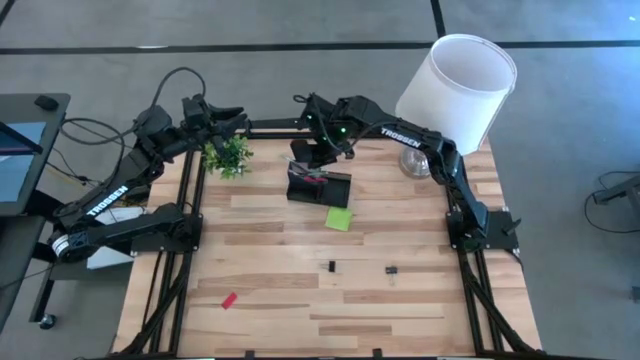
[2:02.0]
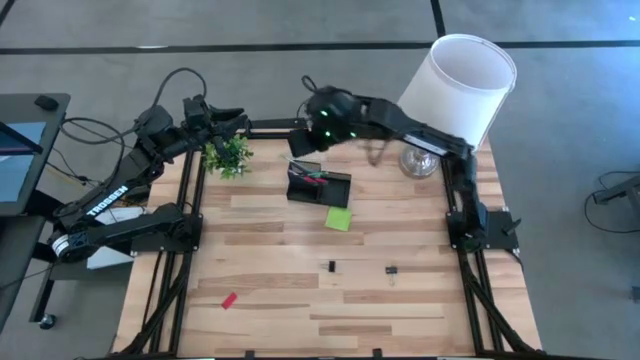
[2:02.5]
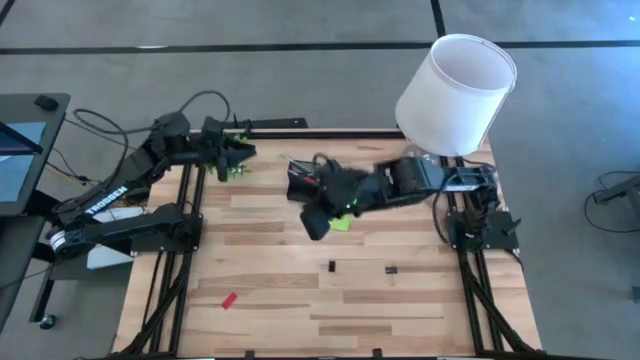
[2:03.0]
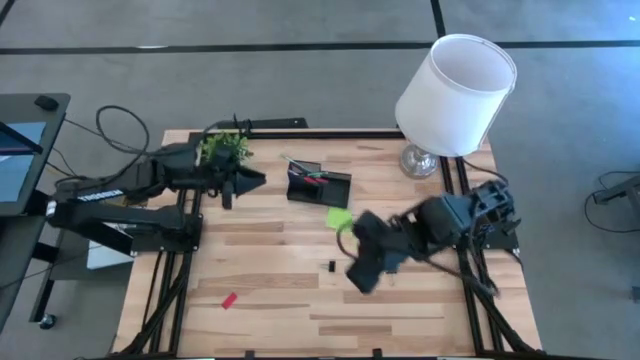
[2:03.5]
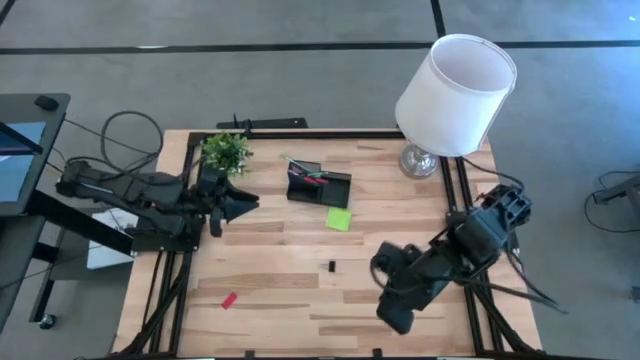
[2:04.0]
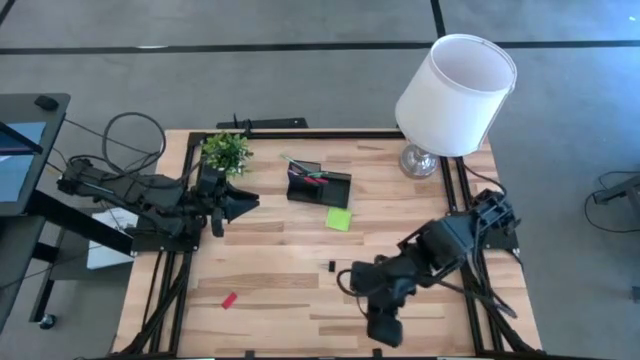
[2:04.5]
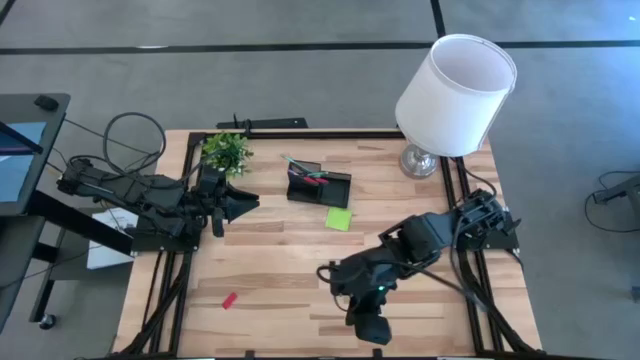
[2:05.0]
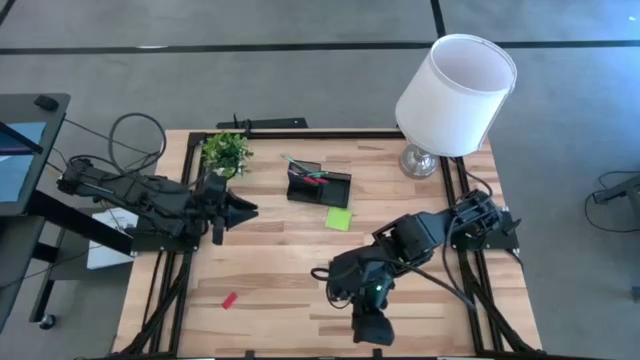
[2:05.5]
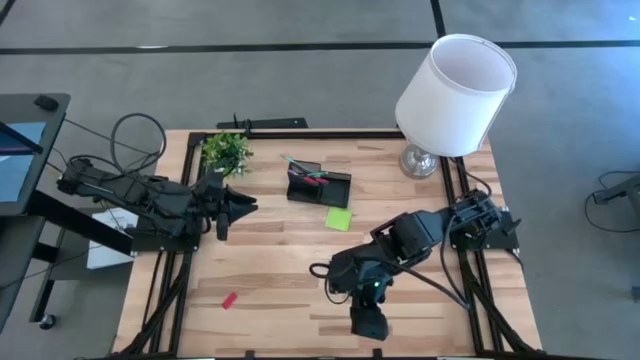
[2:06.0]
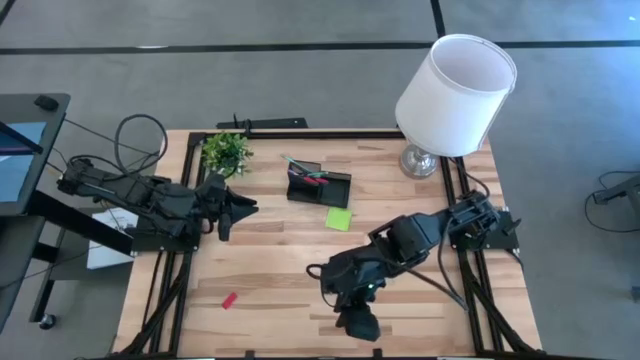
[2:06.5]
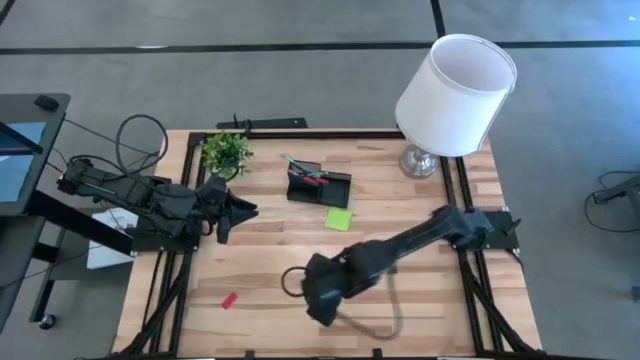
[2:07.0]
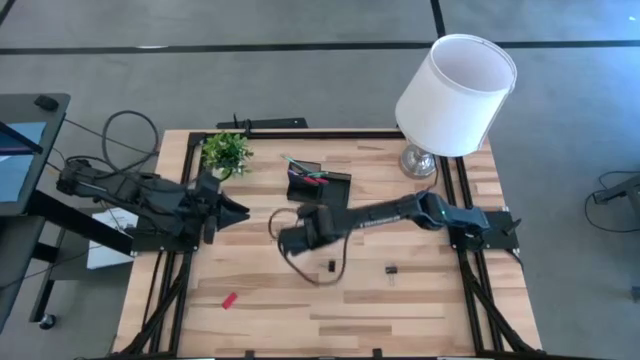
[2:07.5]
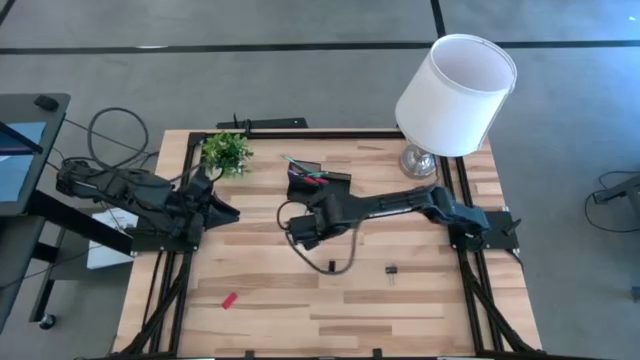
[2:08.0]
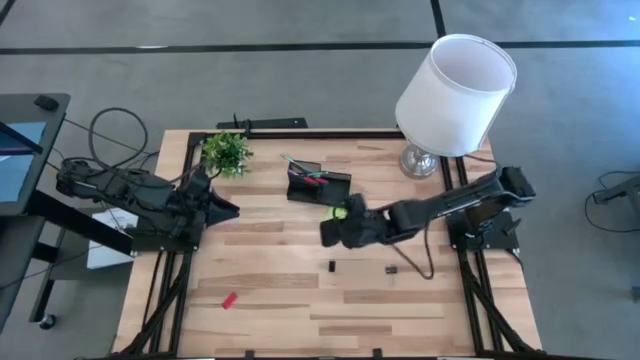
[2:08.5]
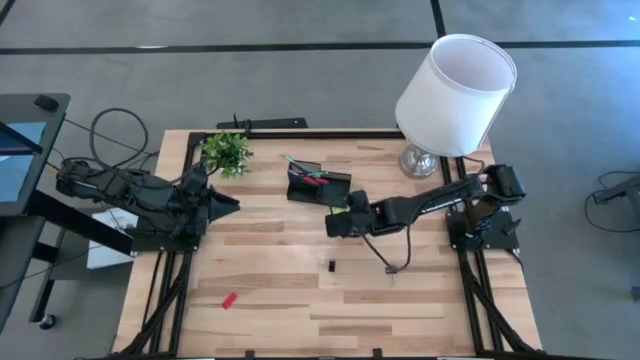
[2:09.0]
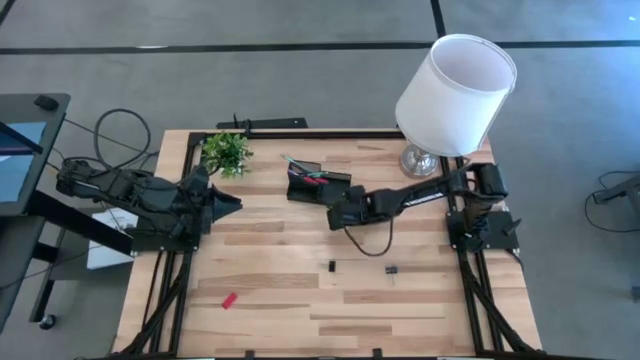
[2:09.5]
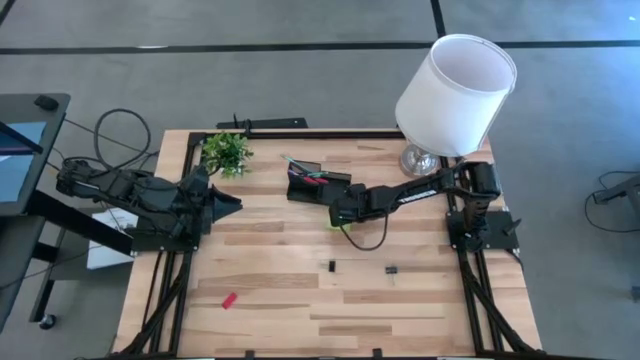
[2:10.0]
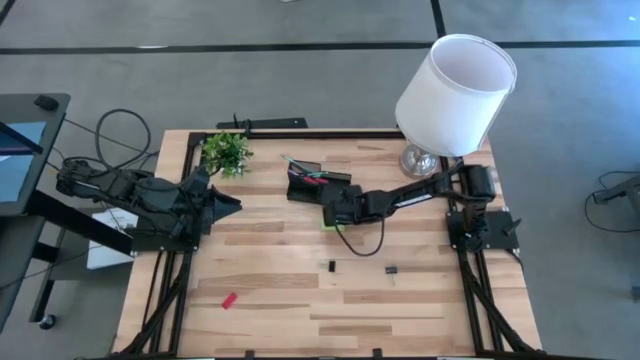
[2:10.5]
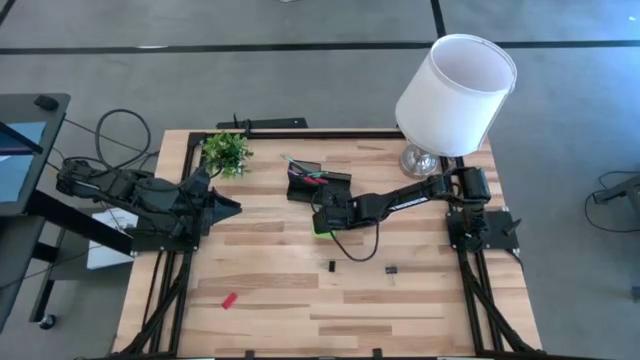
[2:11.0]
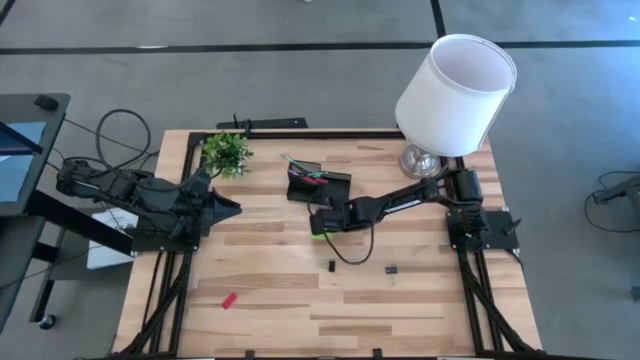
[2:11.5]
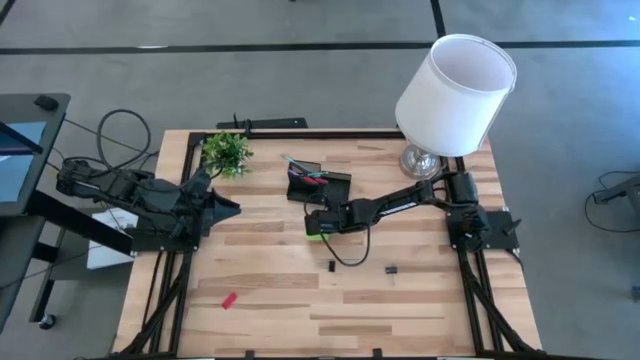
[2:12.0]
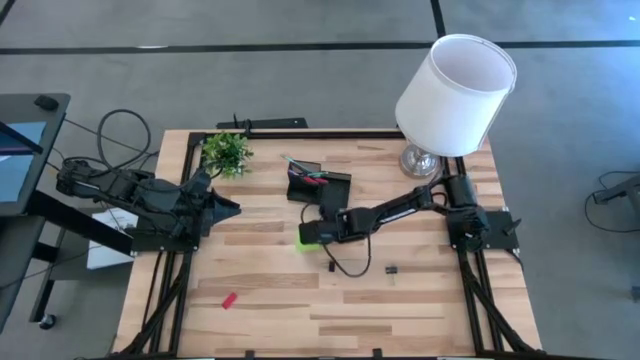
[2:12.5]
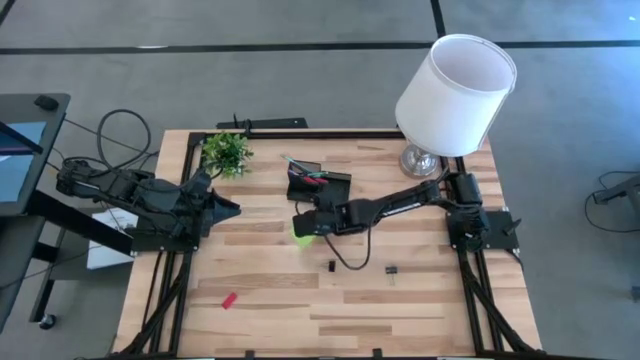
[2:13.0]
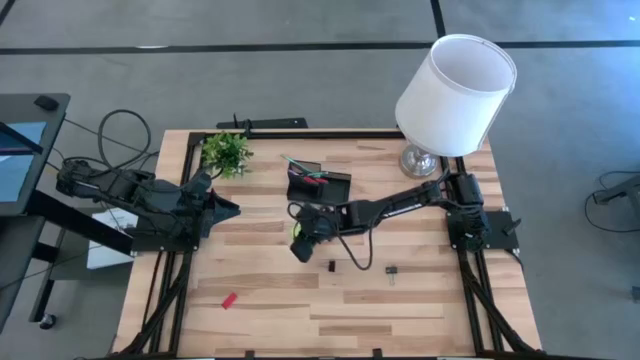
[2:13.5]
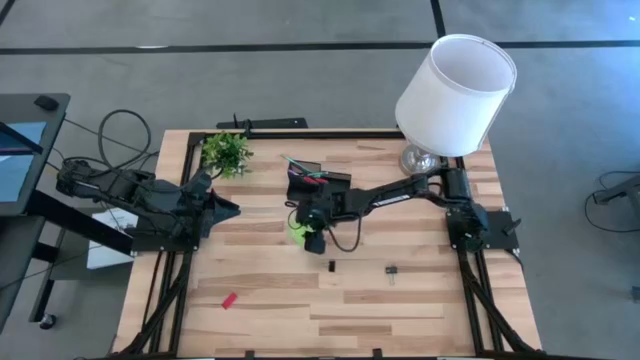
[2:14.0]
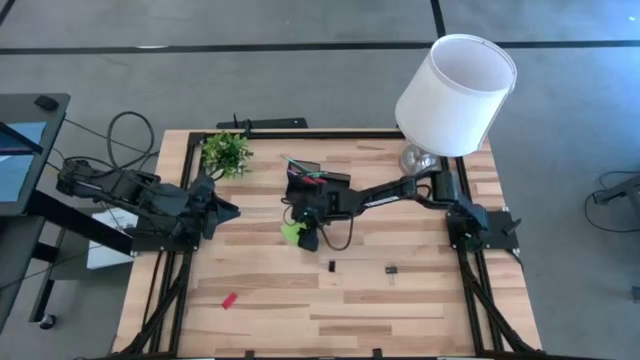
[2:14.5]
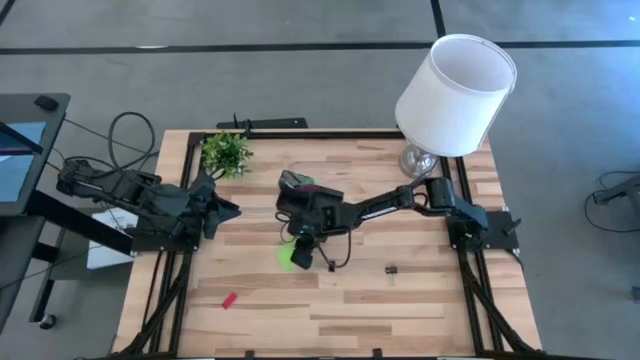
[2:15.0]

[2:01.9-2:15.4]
Task: Pick and place office supplies into organizer
Put the green sticky notes into the black desk organizer

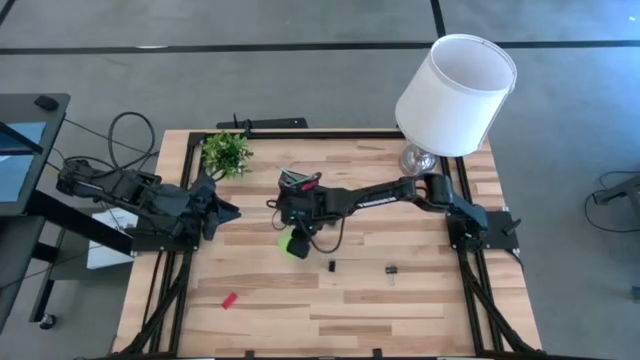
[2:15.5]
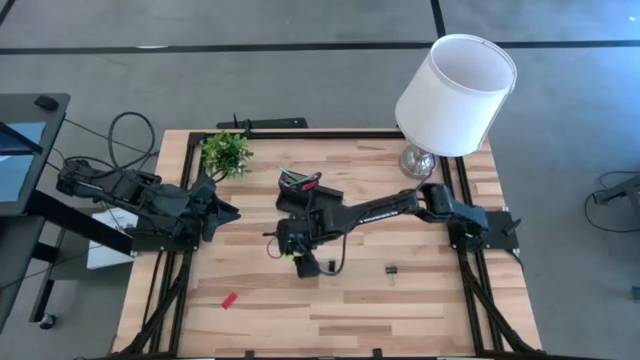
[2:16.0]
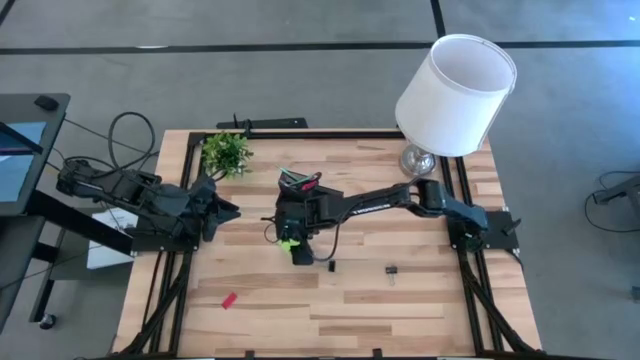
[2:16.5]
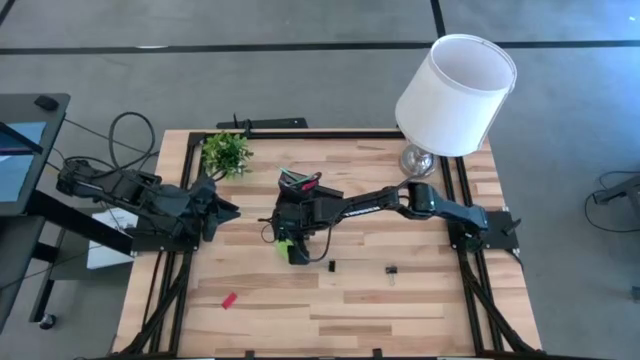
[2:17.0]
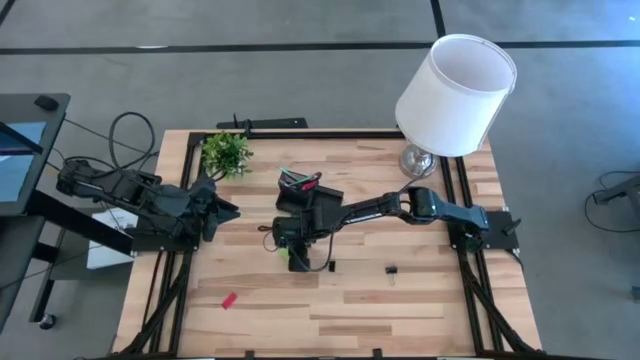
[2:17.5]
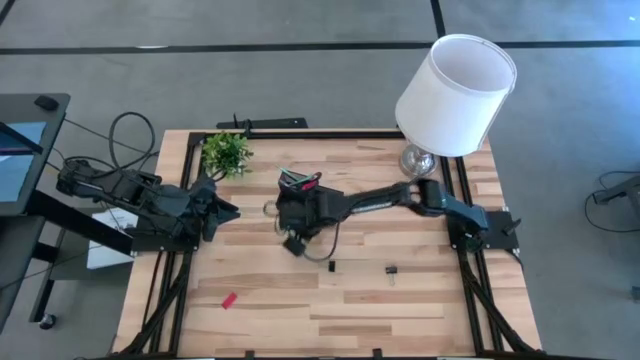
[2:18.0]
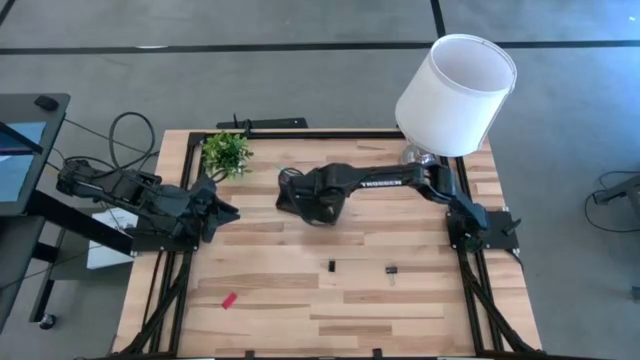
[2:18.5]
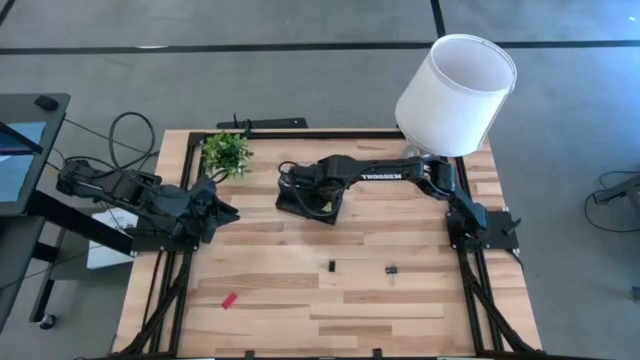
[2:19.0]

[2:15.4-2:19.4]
Put the green sticky notes into the black desk organizer

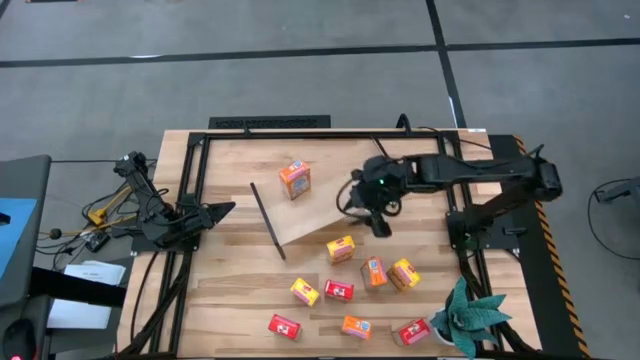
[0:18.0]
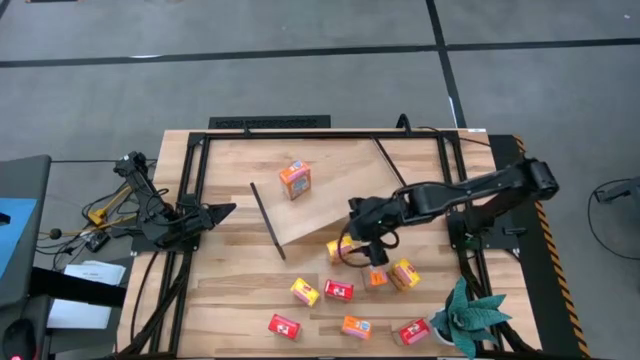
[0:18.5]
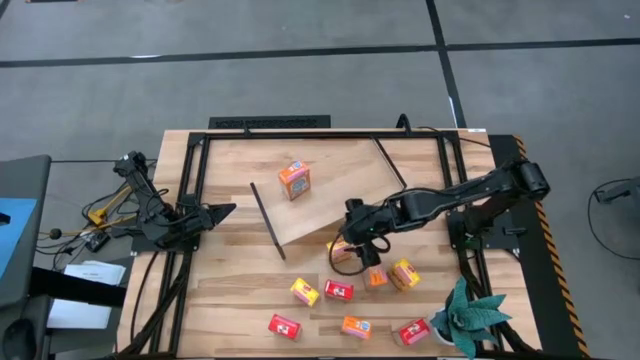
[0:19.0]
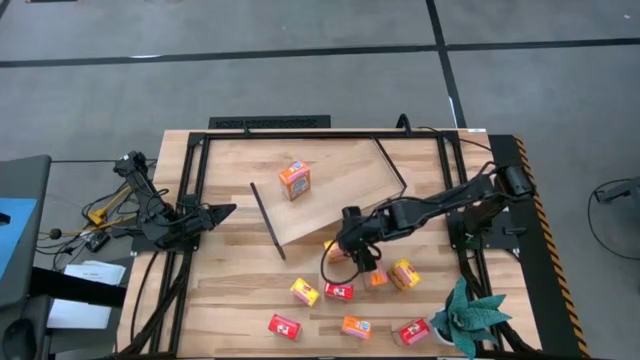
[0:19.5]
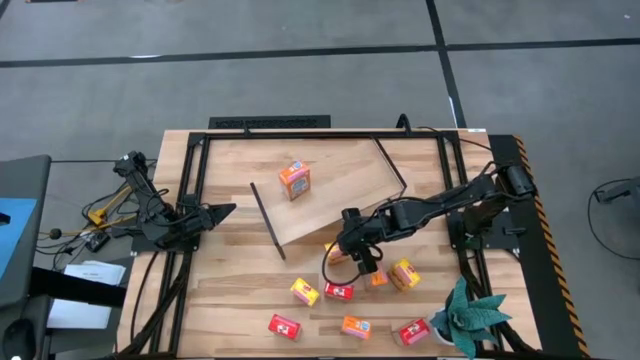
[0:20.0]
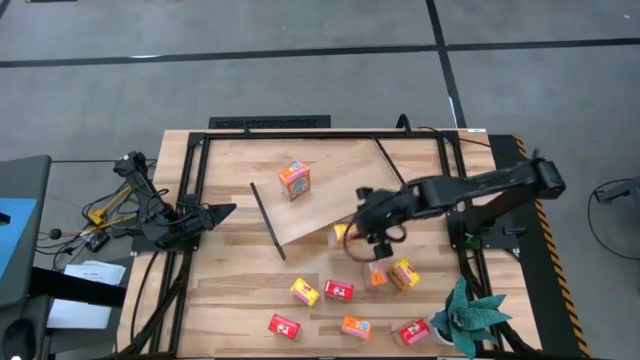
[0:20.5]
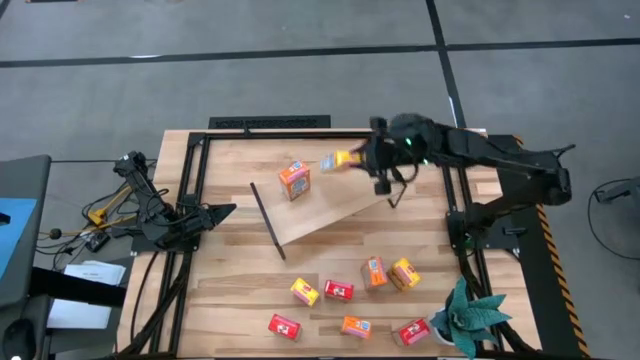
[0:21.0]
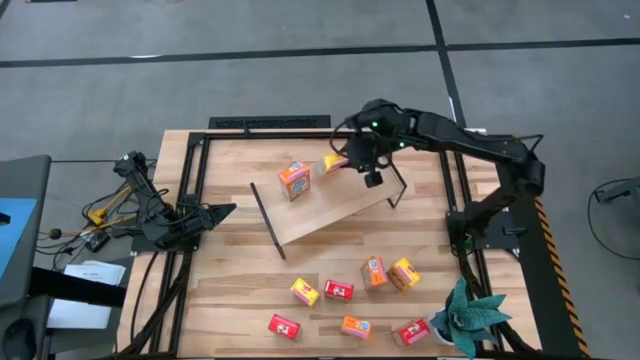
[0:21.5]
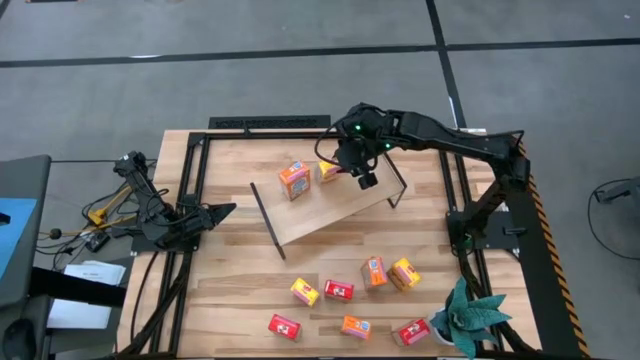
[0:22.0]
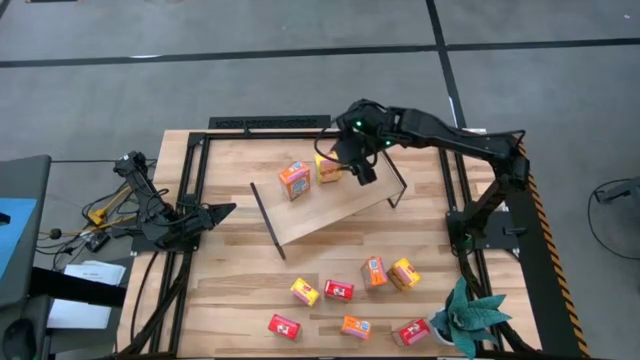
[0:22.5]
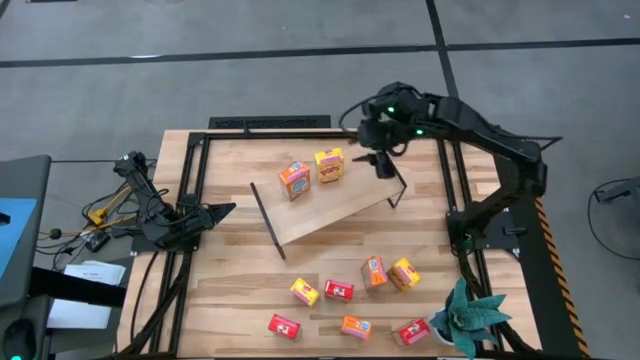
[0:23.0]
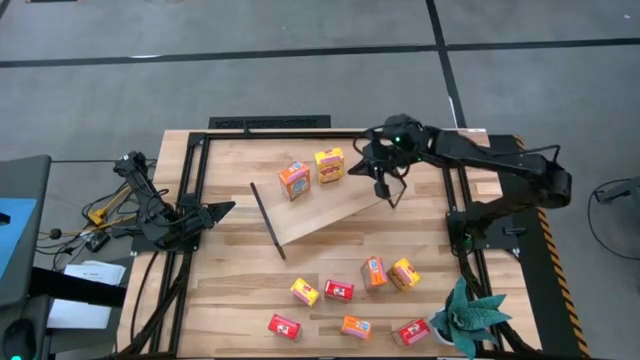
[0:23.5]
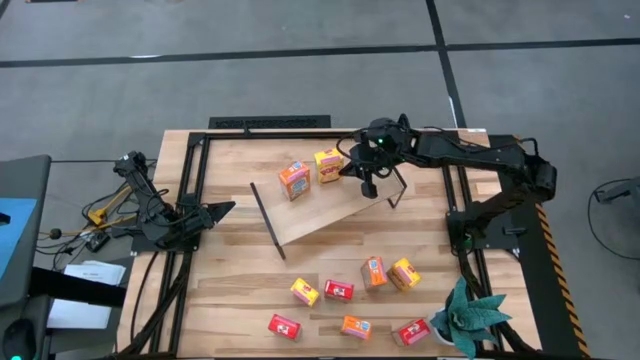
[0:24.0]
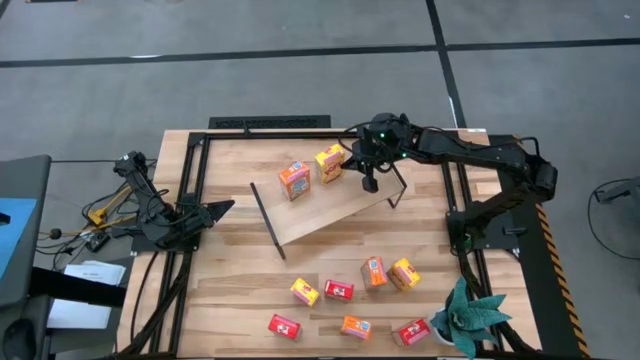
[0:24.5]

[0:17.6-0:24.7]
Task: Stack cereal on shelf
Put the top yellow cereal box on the shelf
